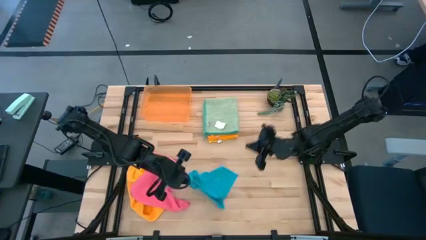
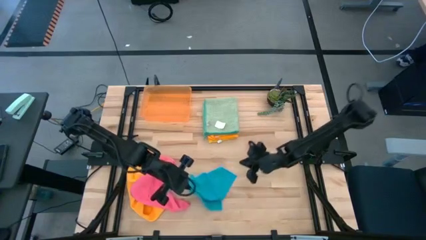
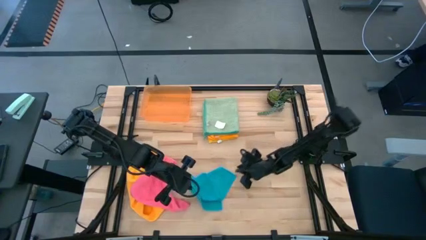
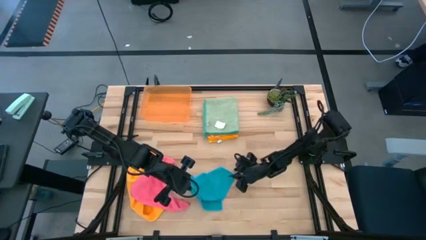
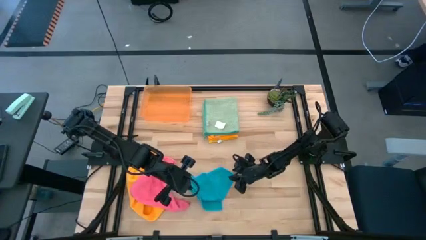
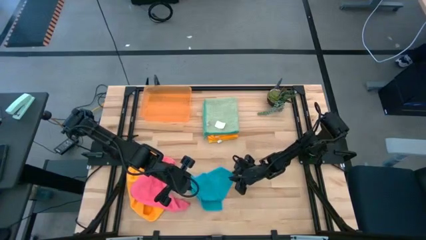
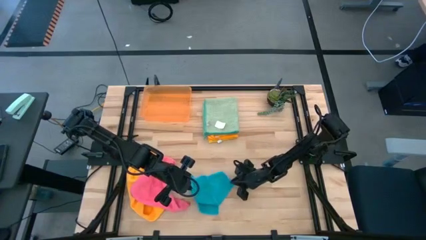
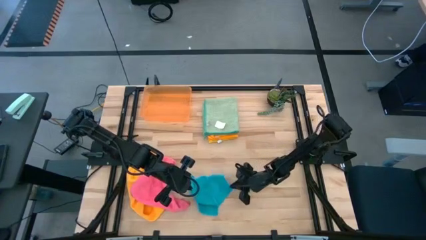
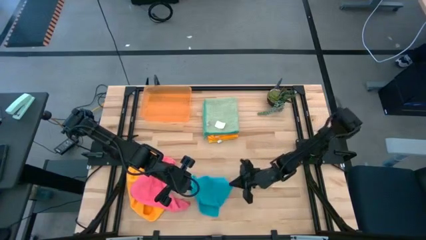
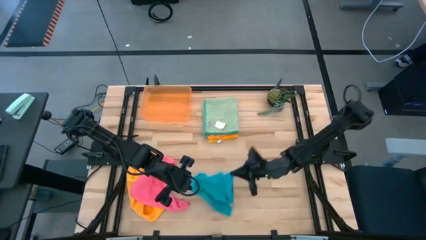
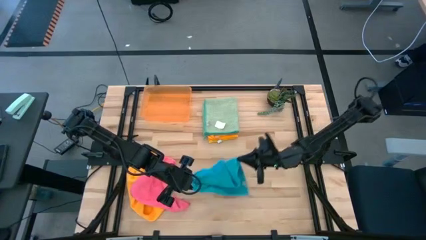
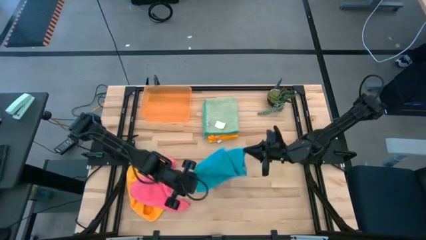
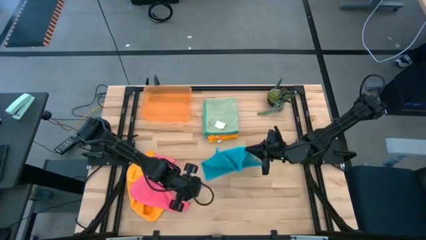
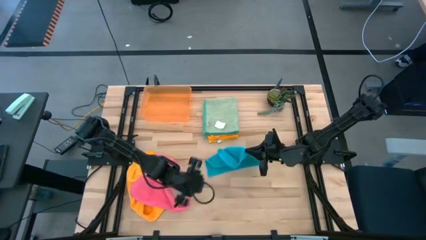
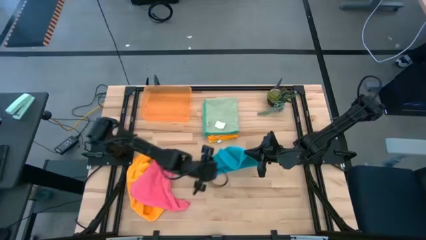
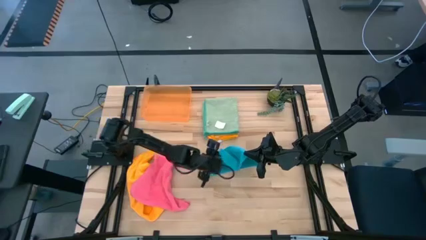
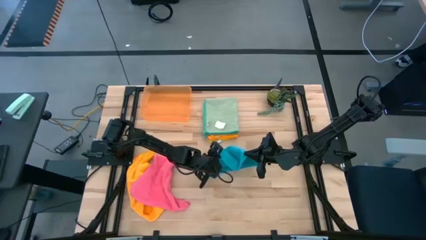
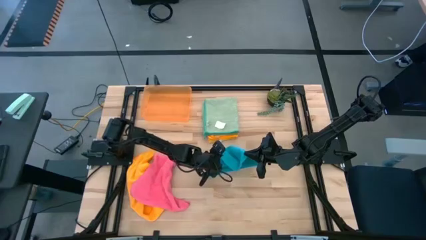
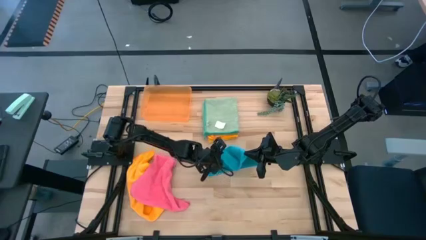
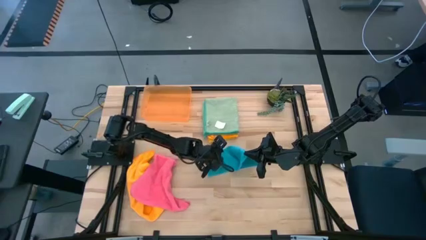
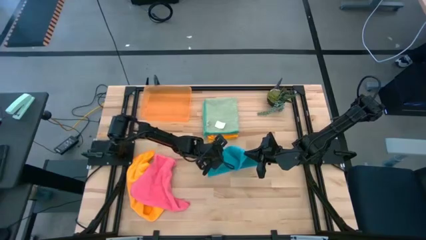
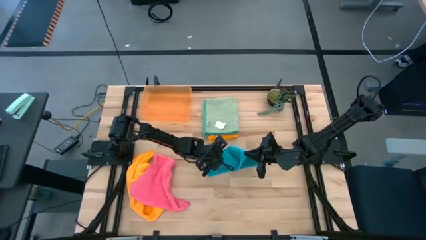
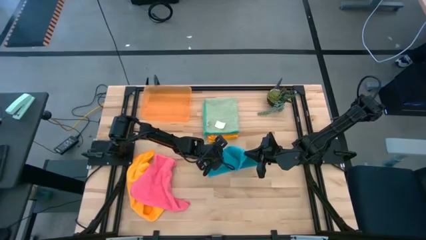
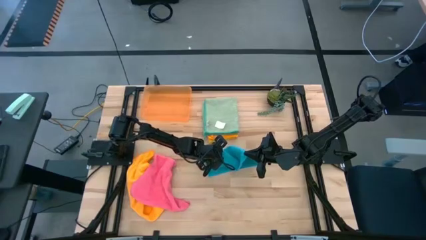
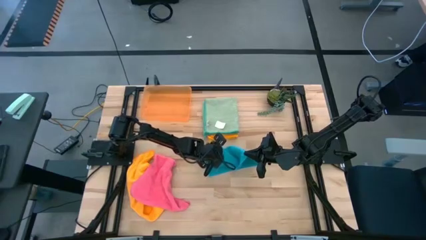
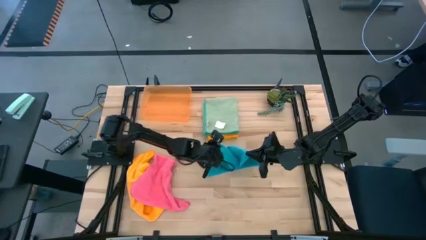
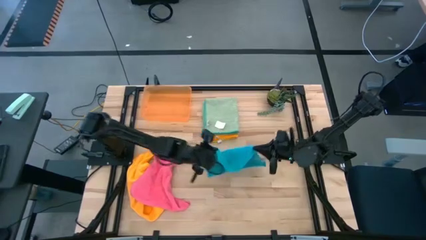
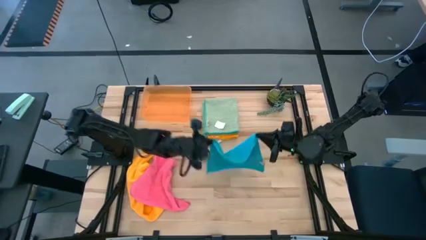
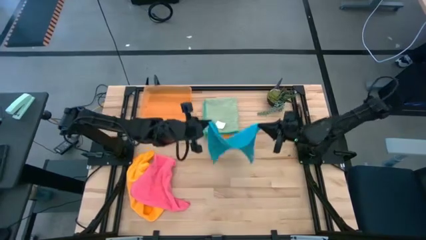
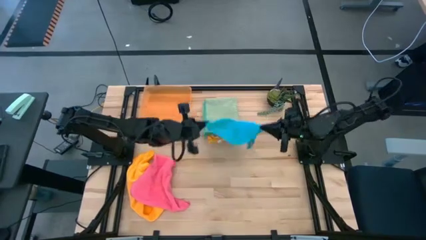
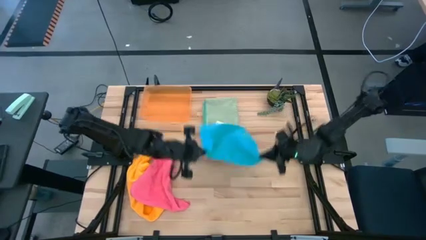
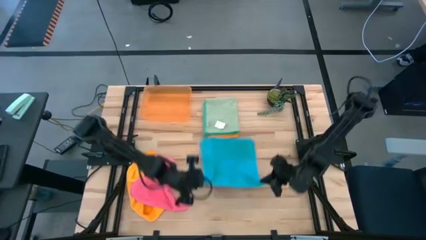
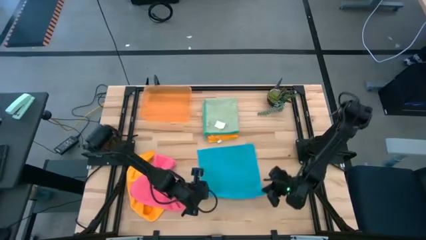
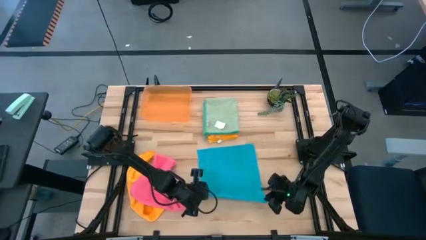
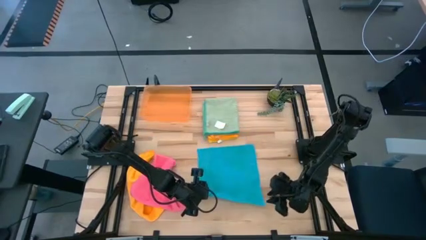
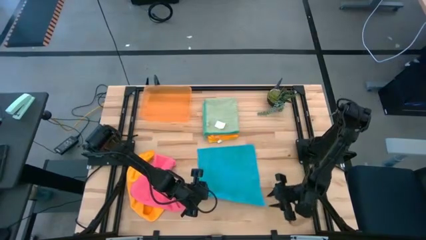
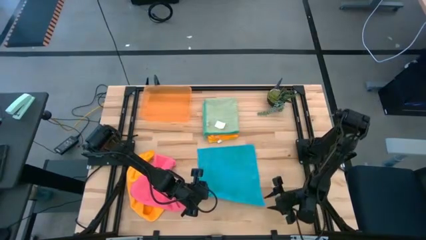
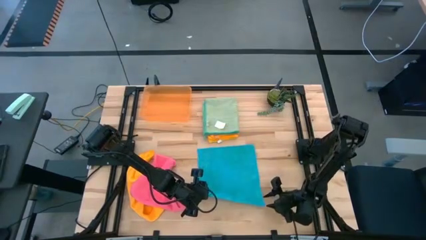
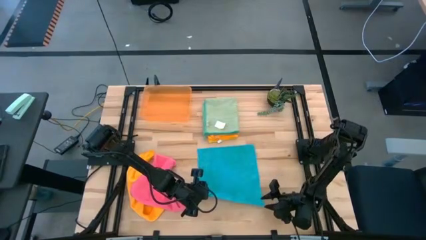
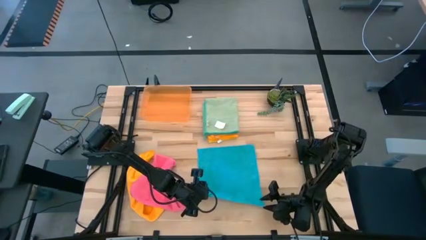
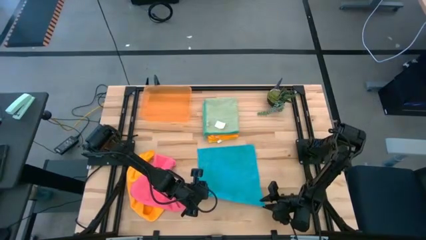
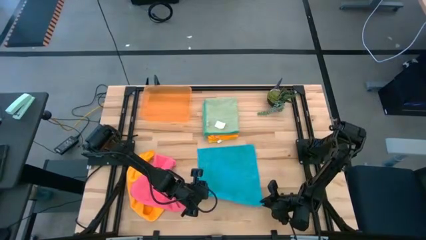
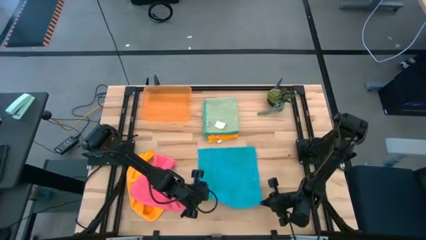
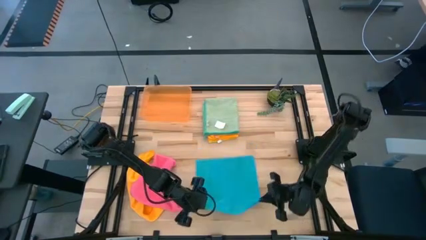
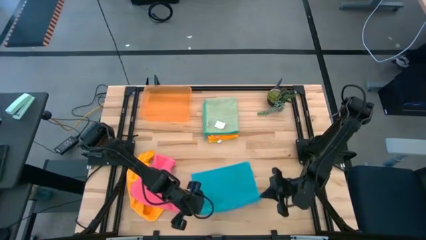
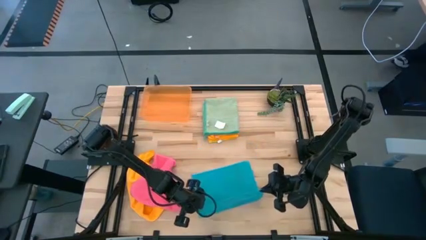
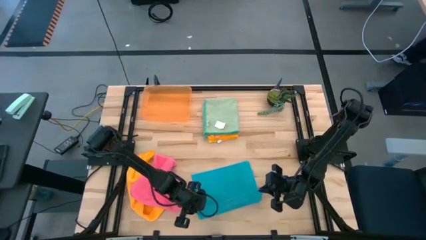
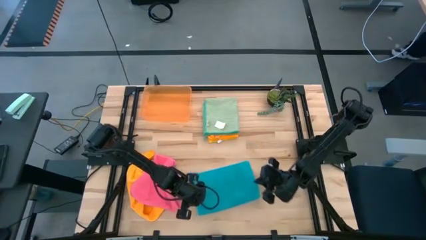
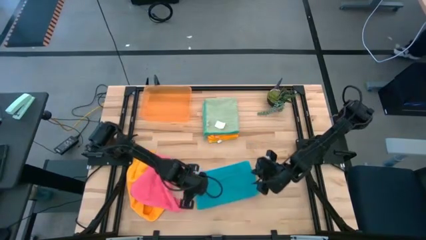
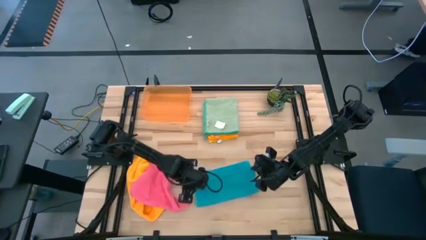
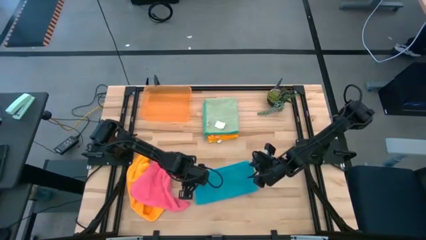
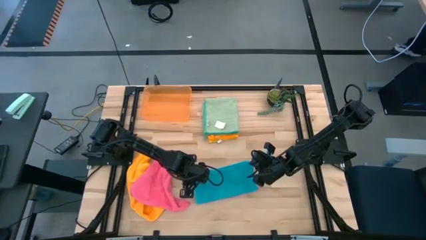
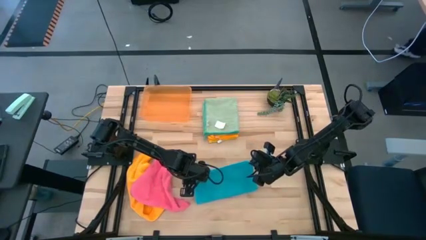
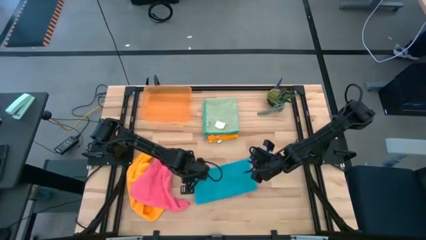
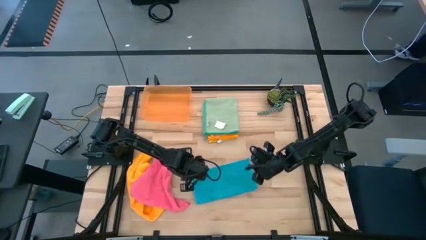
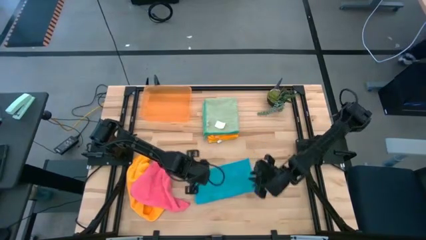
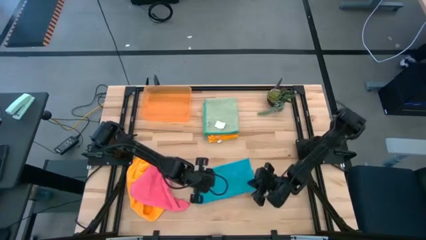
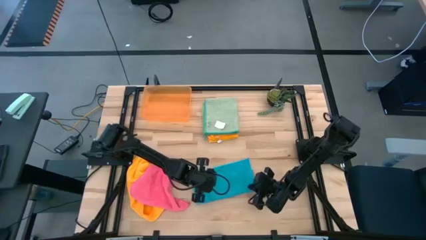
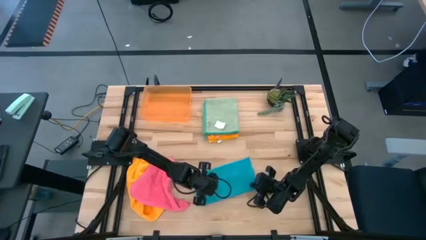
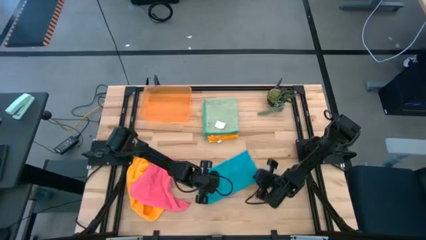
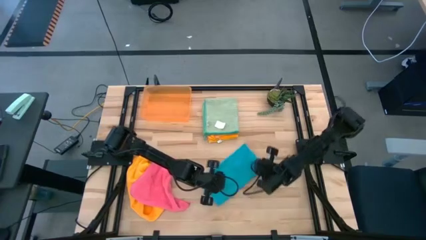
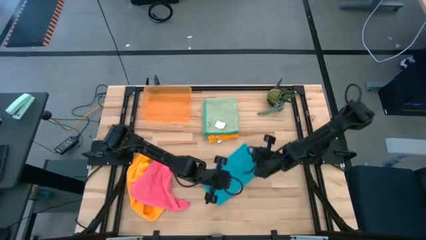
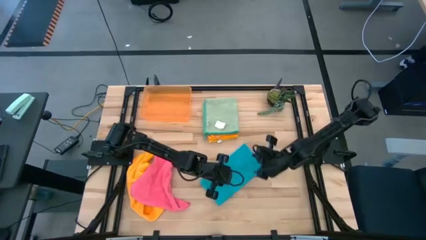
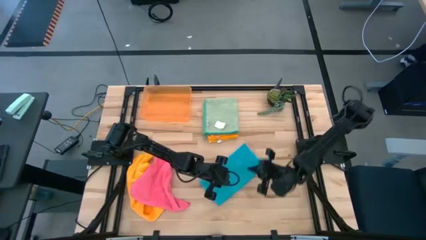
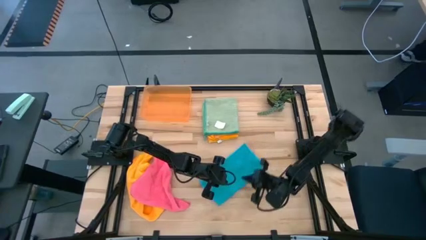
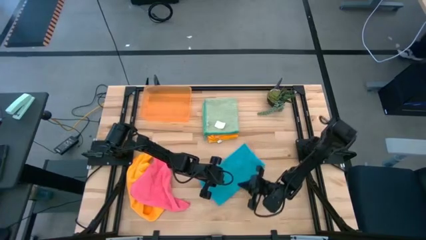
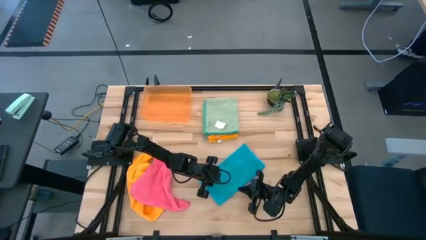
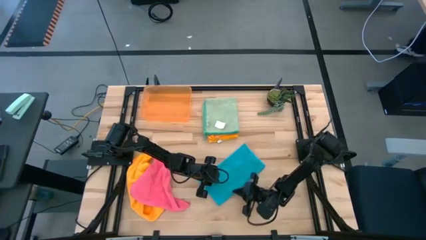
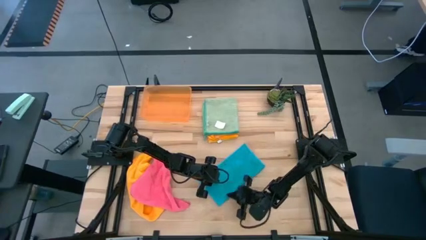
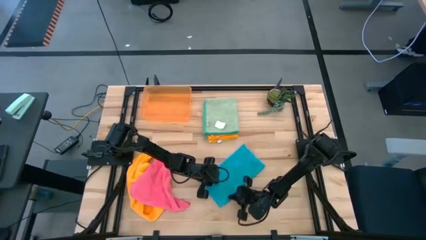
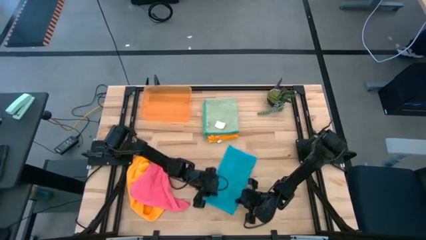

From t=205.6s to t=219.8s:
Task: Fold microfiber towels
Fold the blue towel

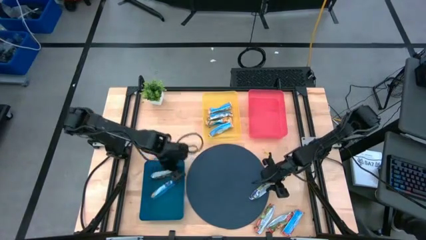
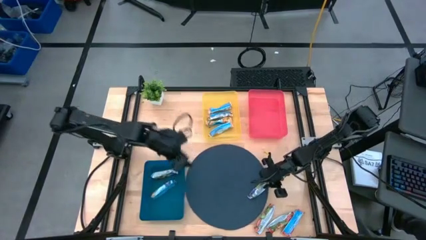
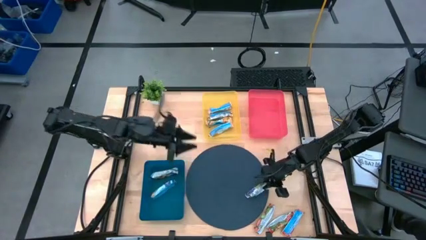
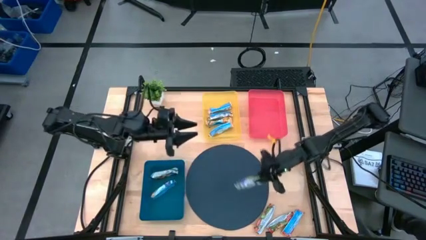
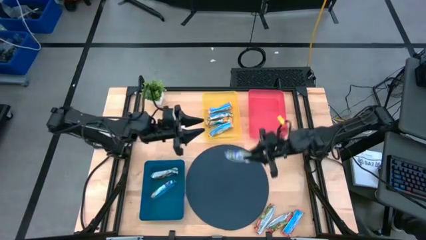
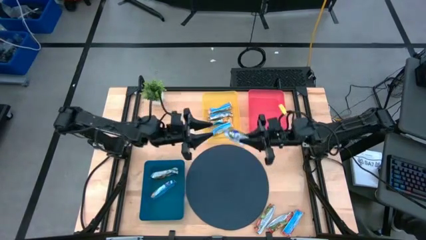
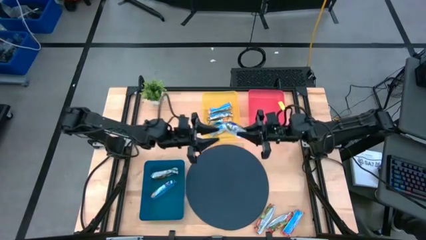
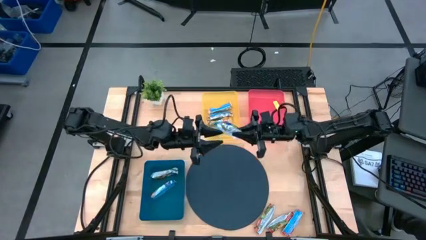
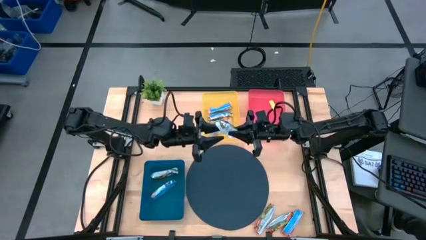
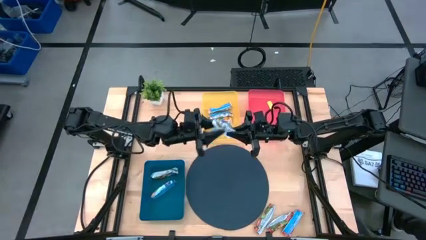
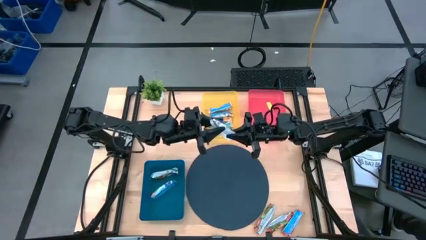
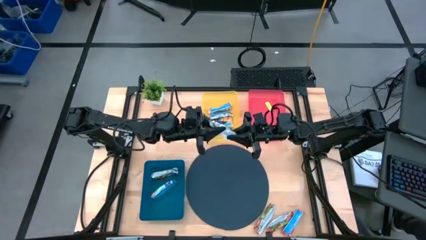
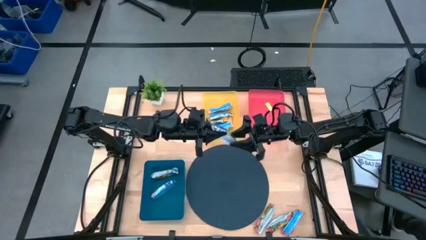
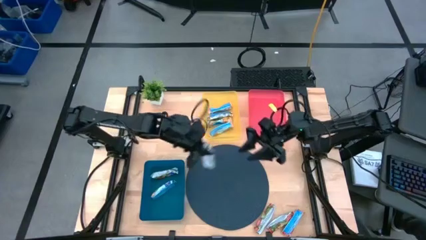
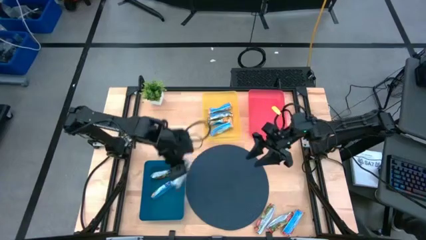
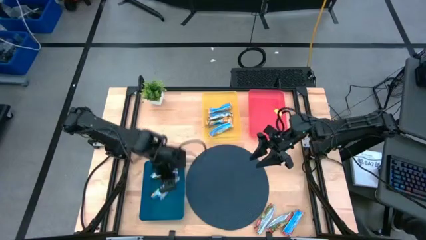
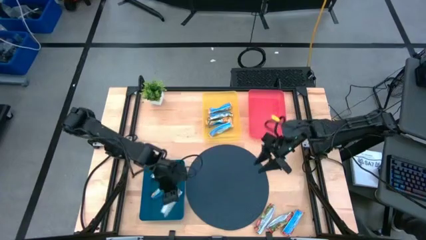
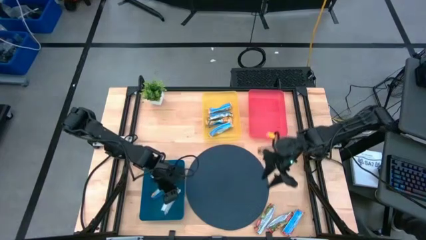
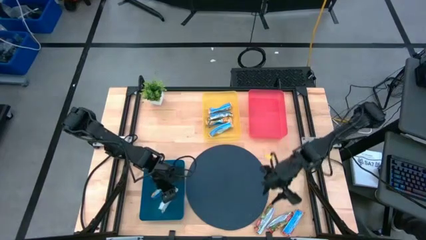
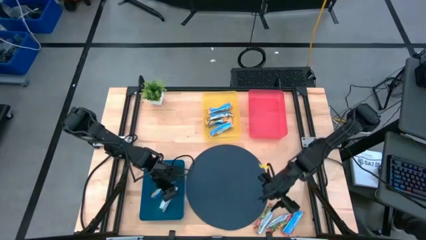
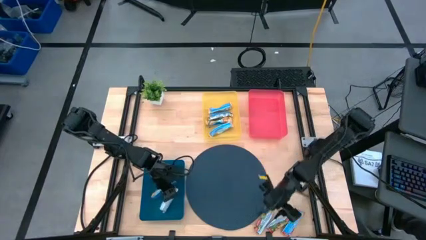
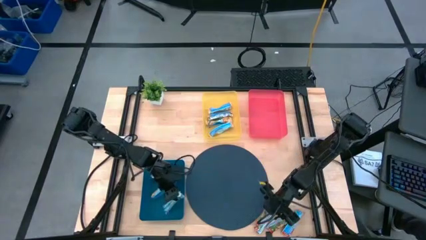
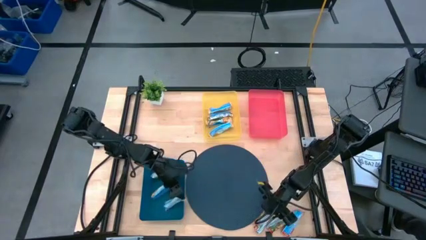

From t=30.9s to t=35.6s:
Task: Pick and place Granola Bars by type
Put the blue granola bar into the blue bin
